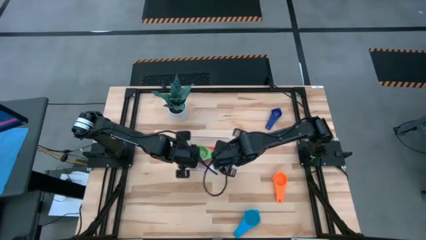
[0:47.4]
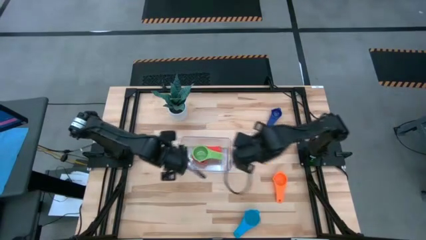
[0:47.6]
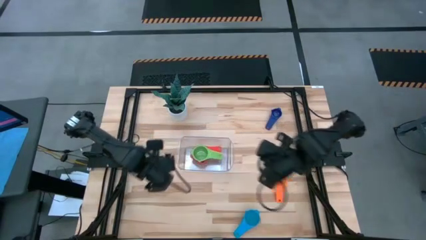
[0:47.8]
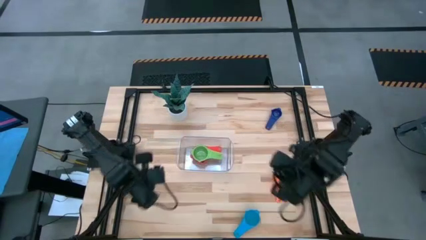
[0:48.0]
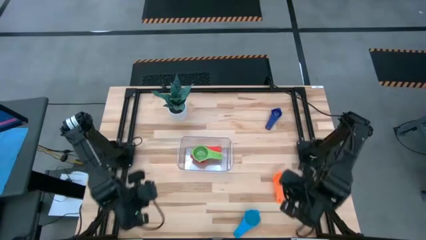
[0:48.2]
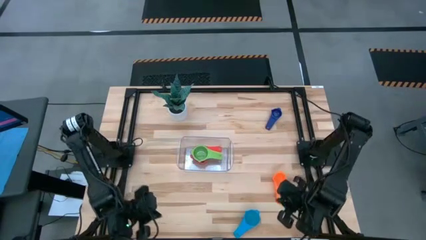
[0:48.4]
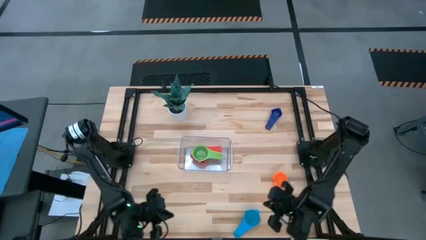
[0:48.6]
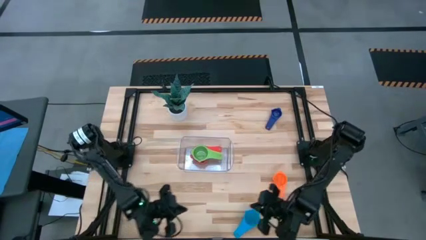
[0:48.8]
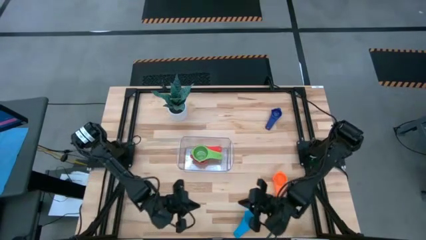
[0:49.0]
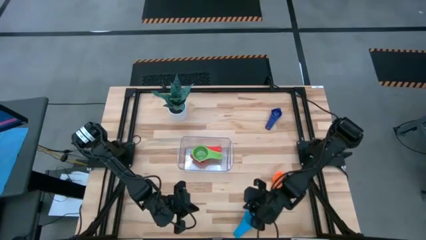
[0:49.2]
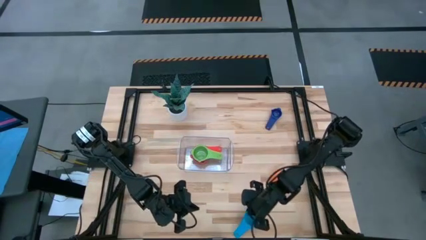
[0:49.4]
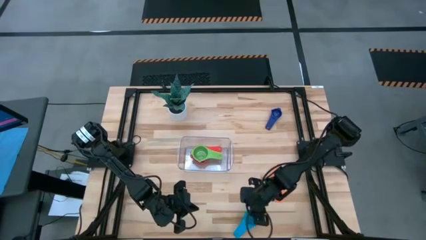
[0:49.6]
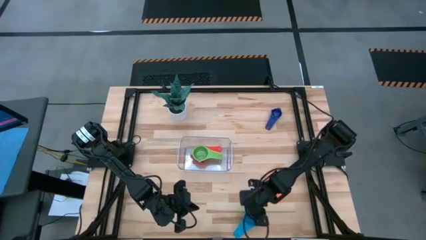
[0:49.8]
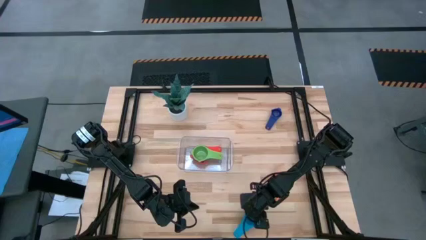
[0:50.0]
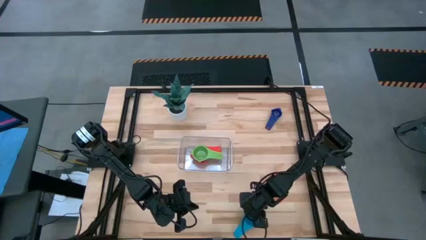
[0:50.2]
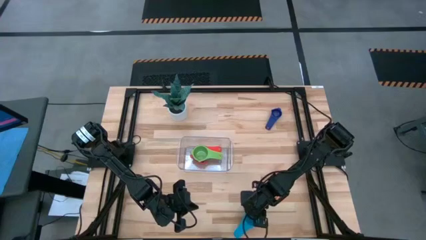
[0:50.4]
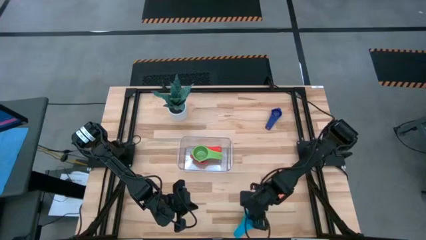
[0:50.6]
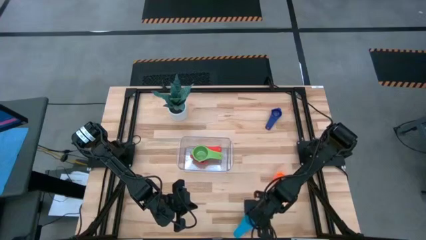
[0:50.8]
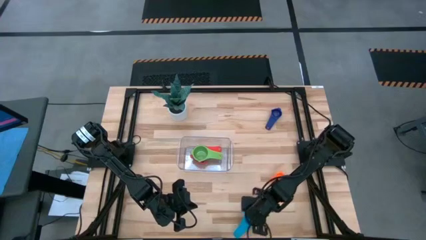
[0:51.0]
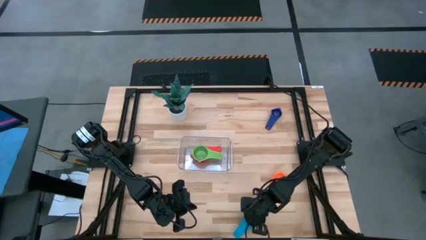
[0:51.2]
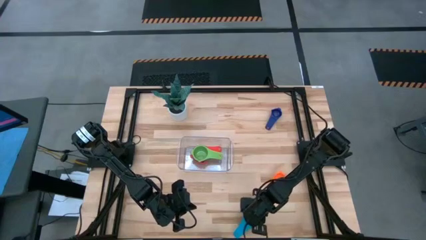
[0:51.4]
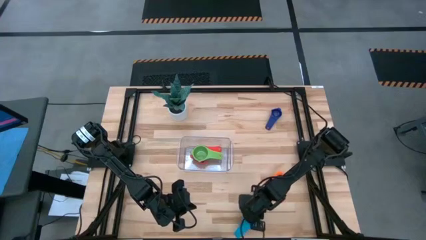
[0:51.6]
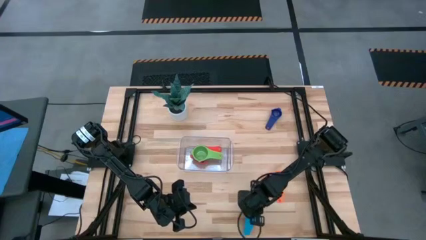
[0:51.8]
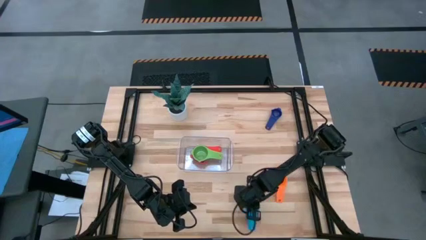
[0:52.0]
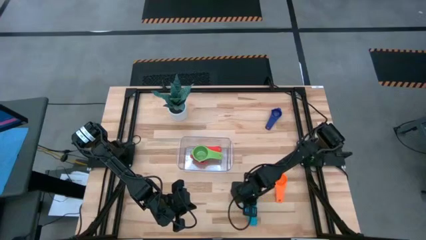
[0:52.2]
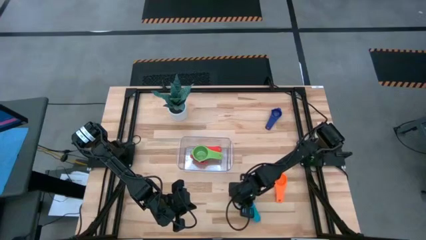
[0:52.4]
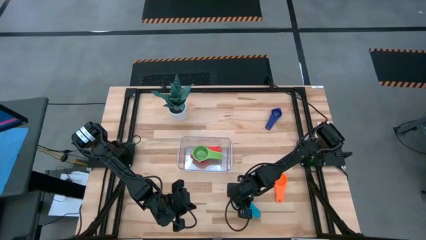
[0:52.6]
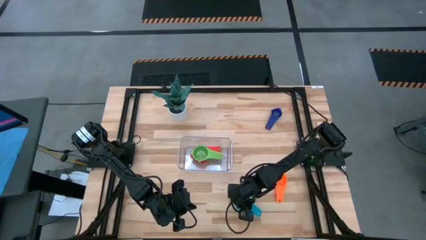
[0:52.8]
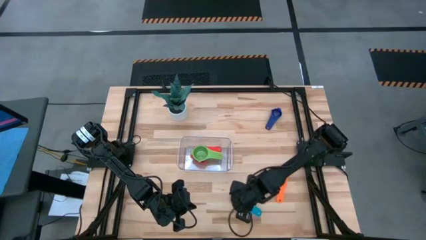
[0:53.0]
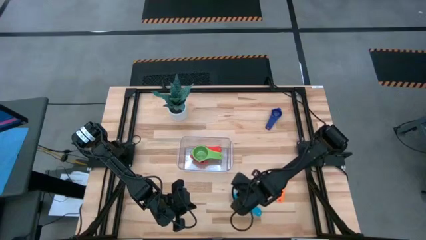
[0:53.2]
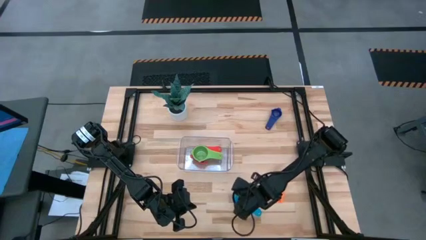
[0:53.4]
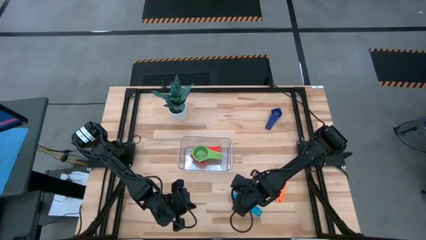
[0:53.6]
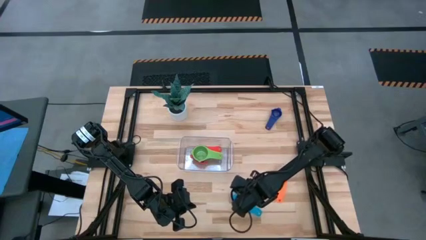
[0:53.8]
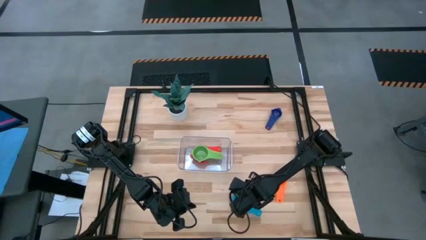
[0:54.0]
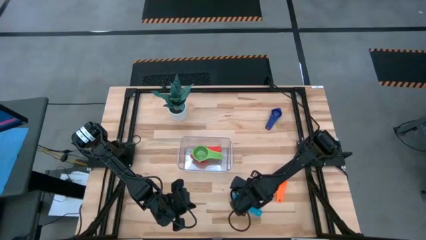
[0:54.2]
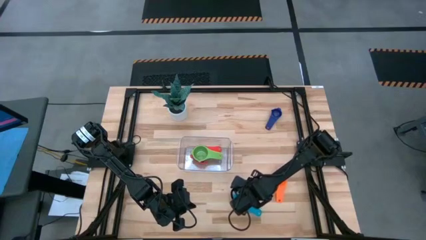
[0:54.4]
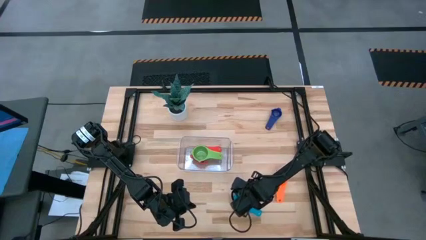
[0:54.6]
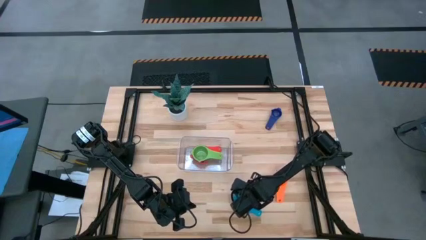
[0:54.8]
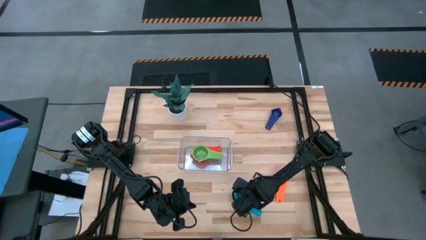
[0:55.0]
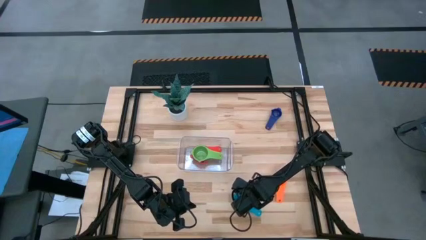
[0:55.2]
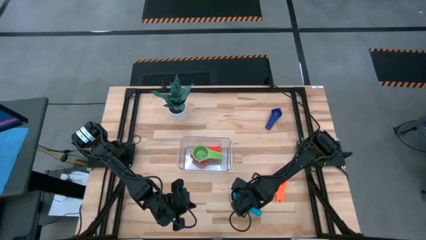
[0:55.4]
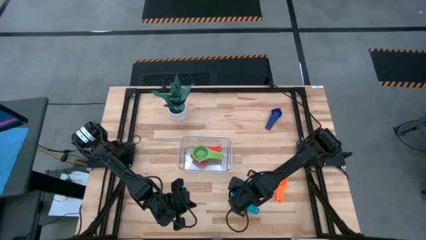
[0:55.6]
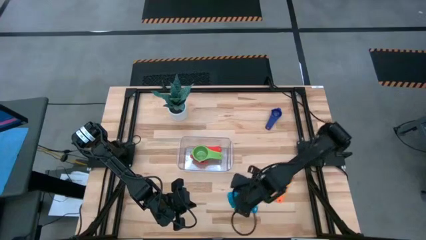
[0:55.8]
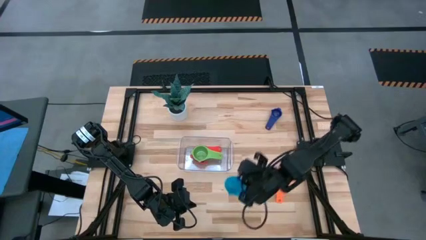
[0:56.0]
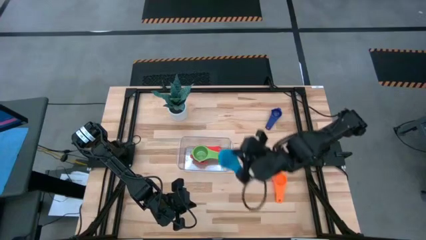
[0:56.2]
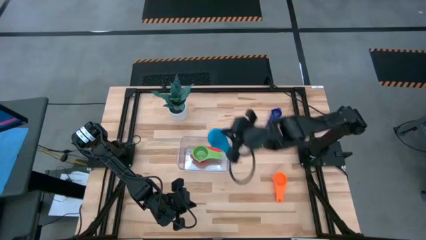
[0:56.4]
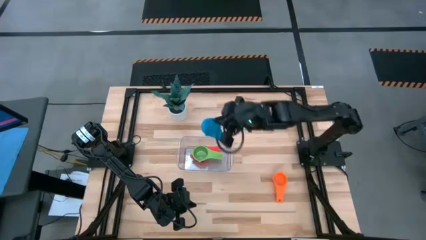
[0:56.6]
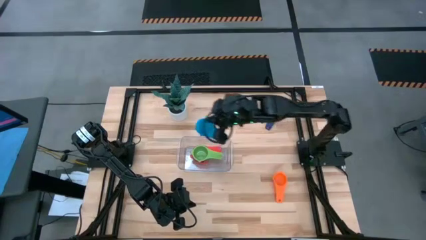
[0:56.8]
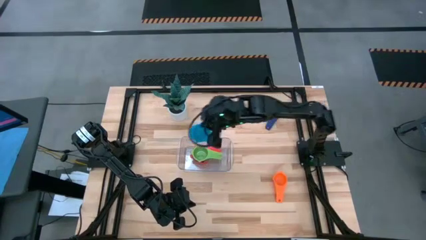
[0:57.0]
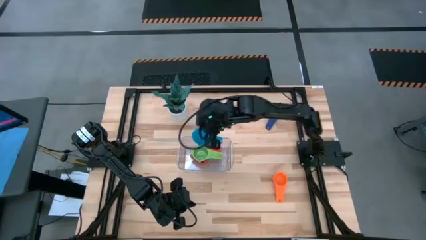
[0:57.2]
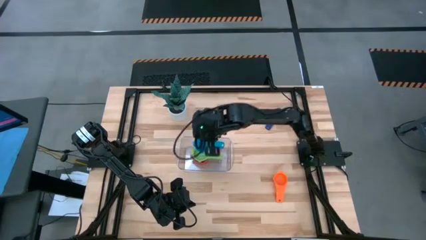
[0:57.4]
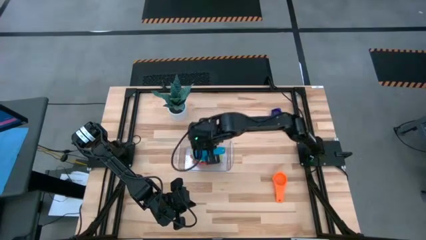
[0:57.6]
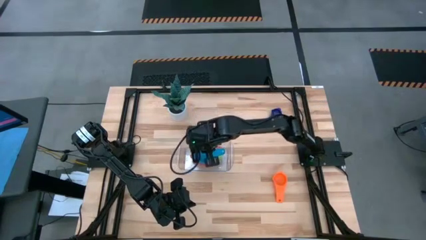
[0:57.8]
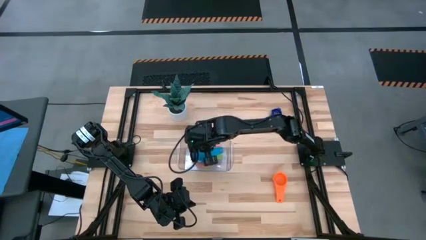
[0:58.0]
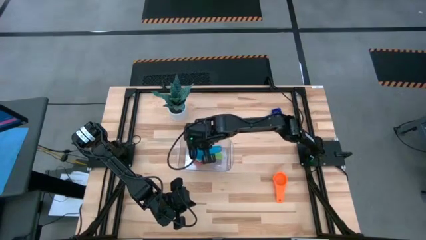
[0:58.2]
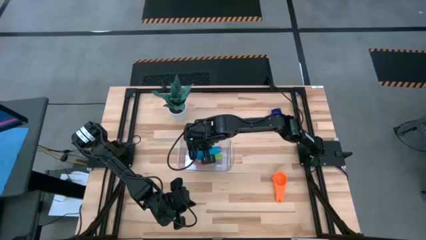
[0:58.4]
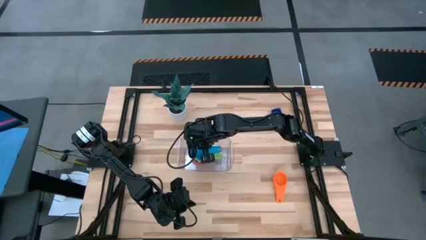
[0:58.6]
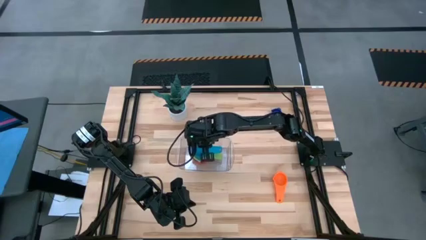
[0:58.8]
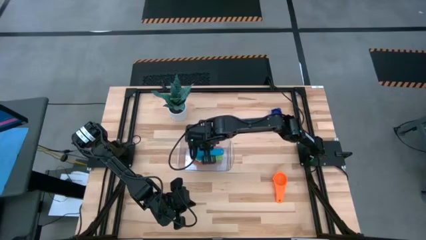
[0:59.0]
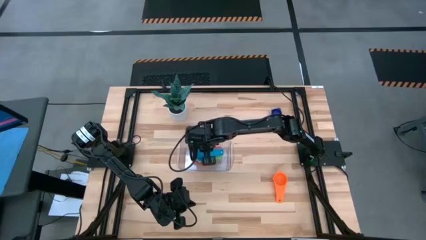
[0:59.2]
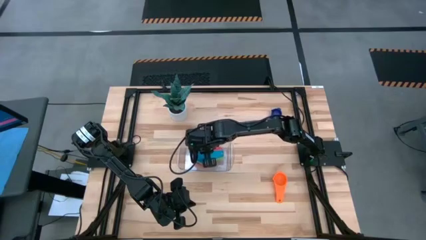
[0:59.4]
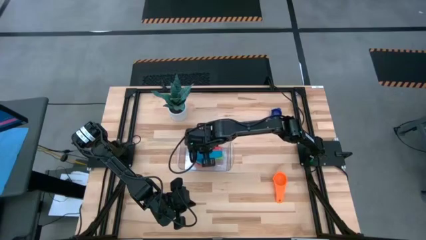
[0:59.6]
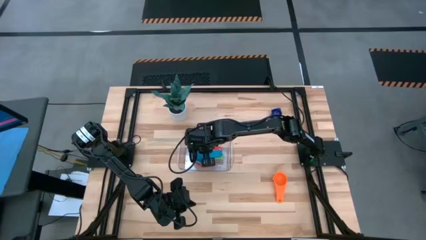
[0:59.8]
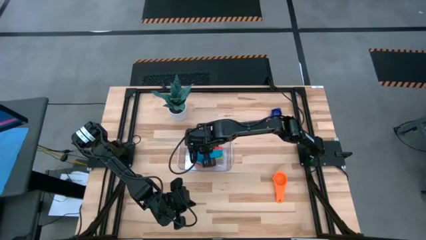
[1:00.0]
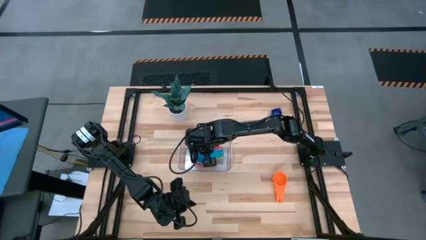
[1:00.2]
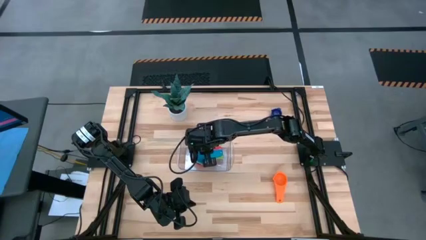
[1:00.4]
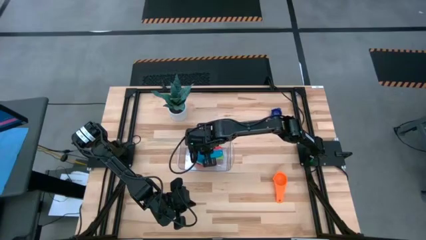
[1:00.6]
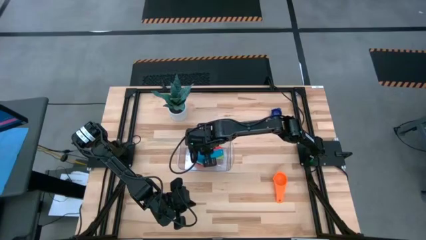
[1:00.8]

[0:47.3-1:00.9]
Task: Nest measuring cups in basket
Stack the light blue measuring cup into the green measuring cup
